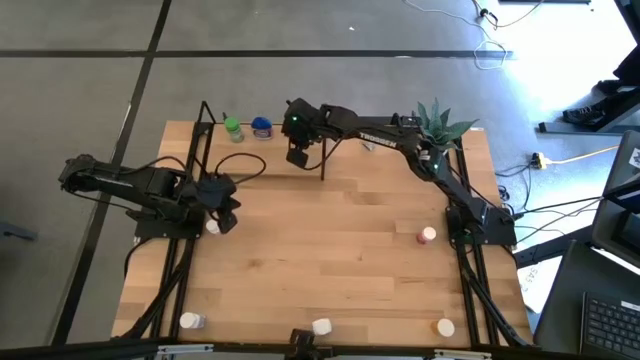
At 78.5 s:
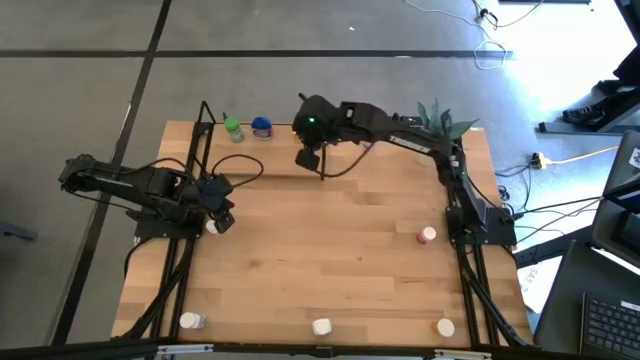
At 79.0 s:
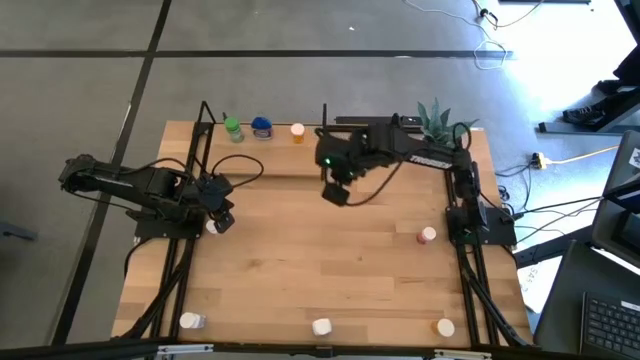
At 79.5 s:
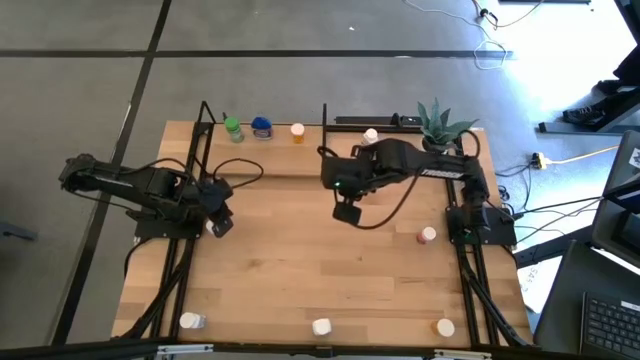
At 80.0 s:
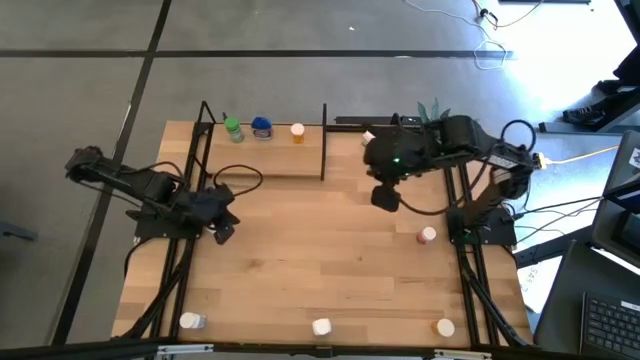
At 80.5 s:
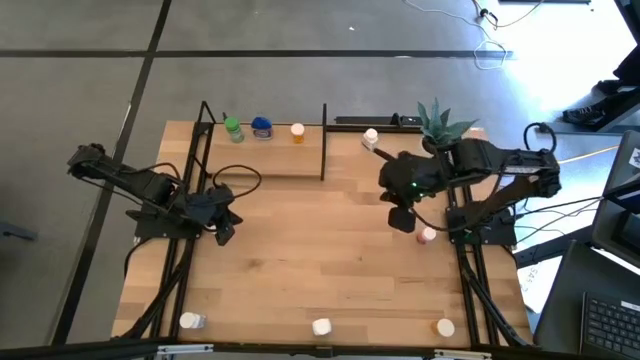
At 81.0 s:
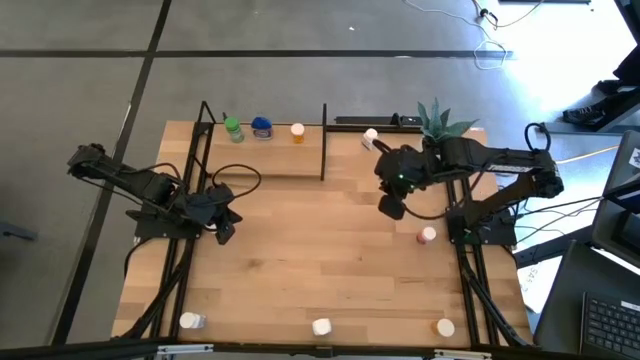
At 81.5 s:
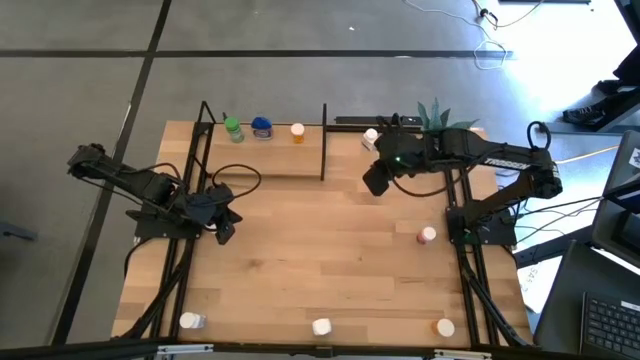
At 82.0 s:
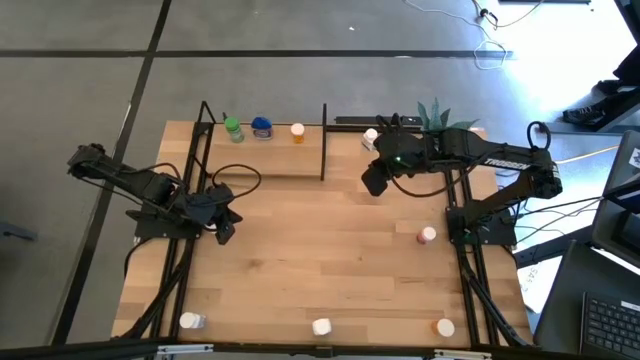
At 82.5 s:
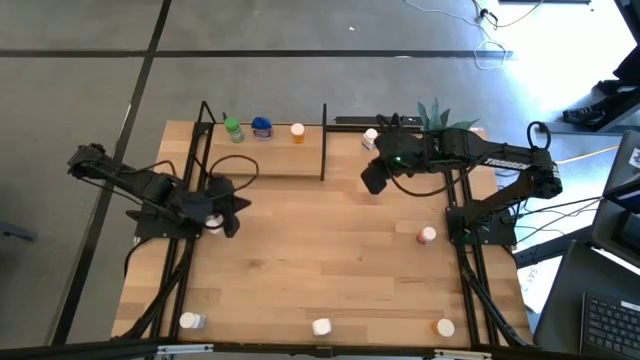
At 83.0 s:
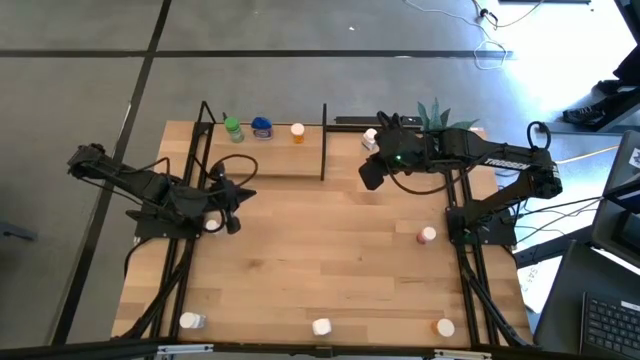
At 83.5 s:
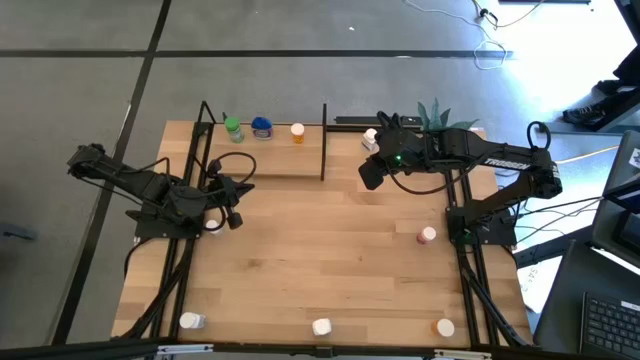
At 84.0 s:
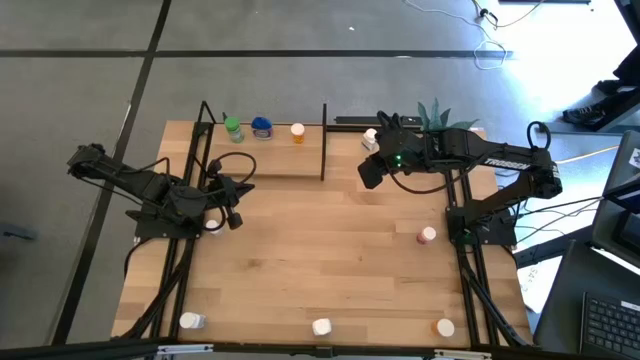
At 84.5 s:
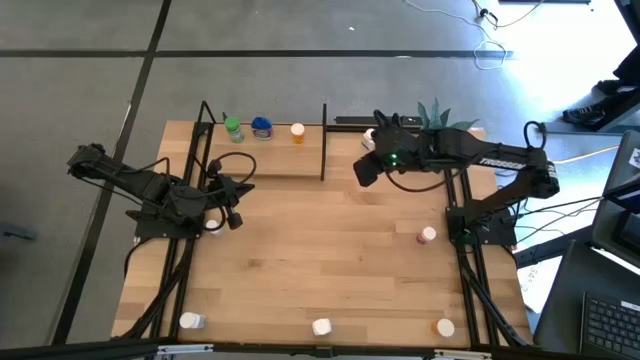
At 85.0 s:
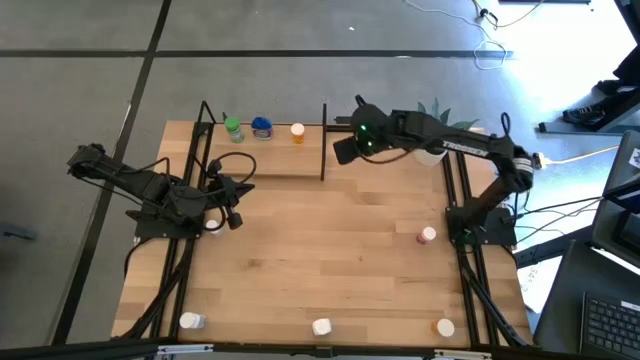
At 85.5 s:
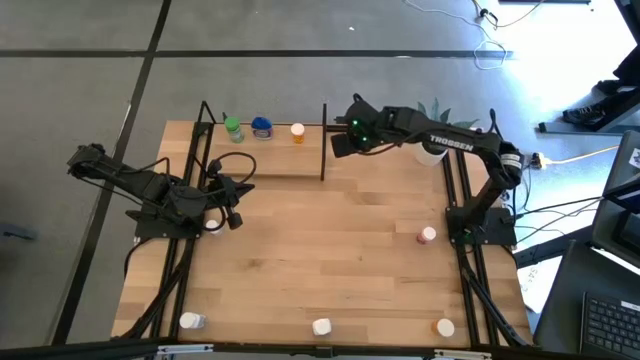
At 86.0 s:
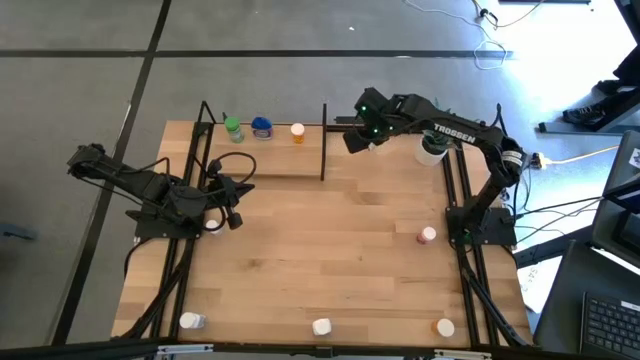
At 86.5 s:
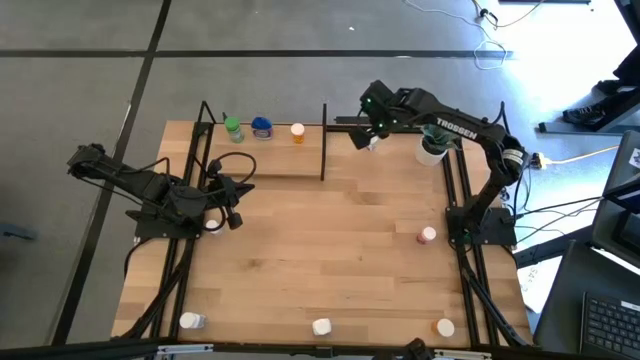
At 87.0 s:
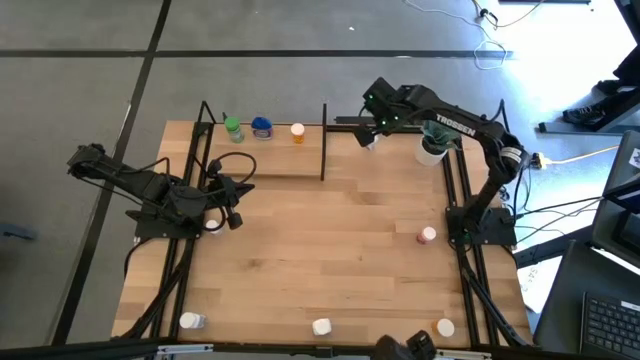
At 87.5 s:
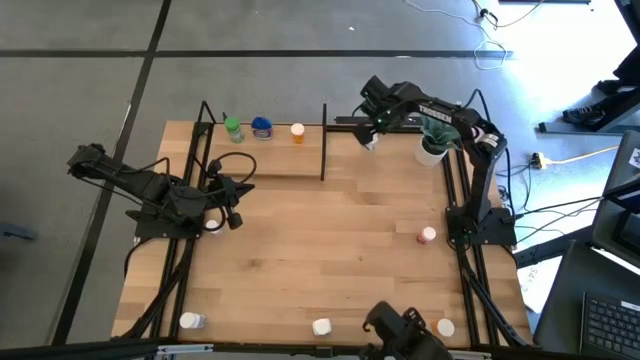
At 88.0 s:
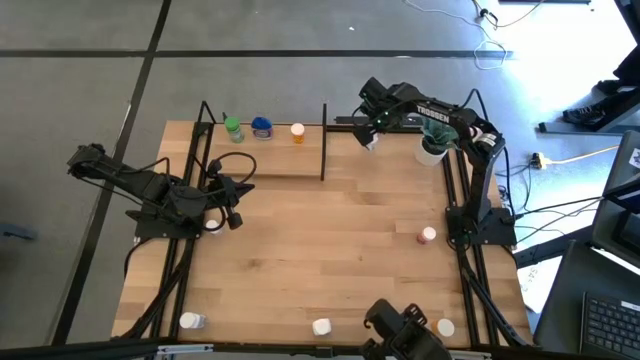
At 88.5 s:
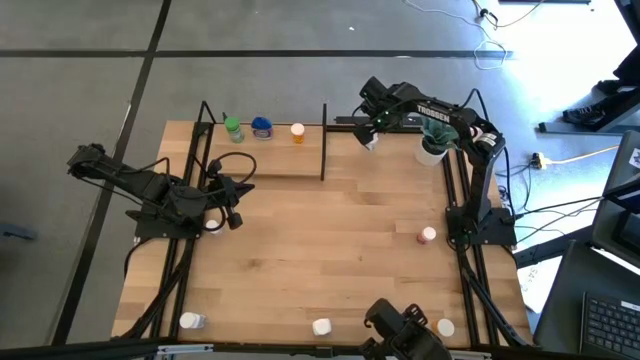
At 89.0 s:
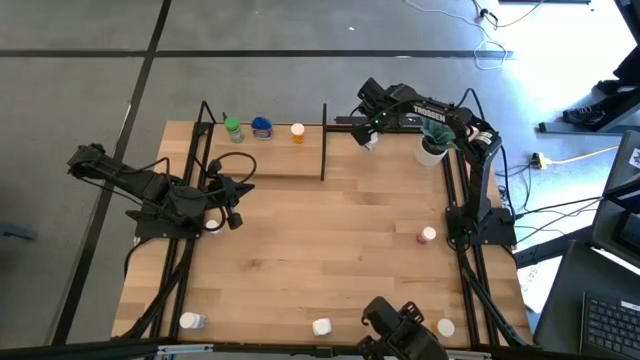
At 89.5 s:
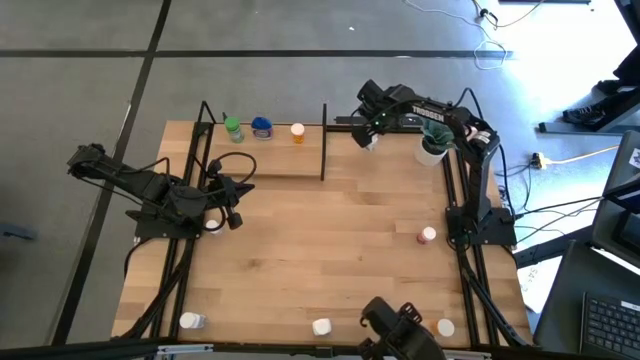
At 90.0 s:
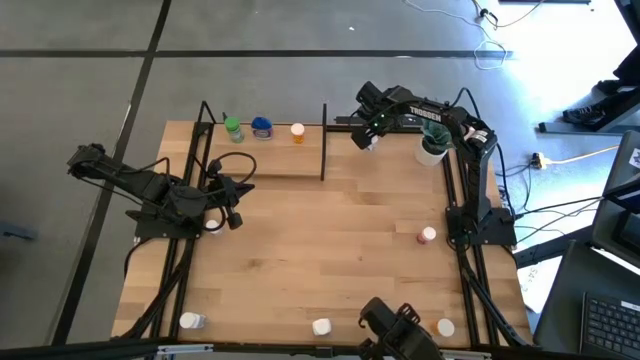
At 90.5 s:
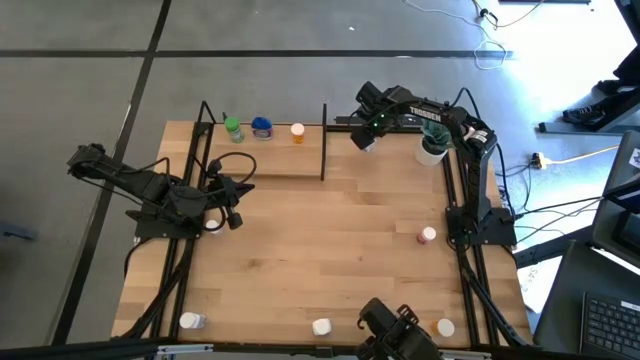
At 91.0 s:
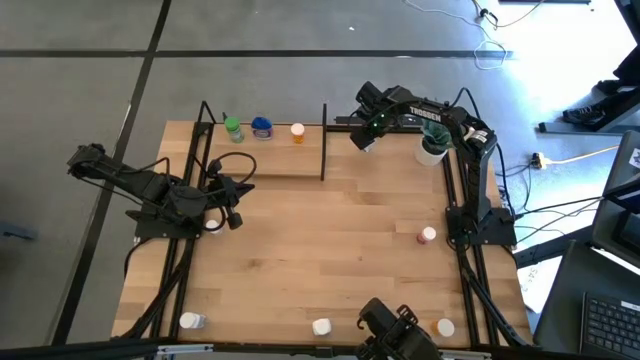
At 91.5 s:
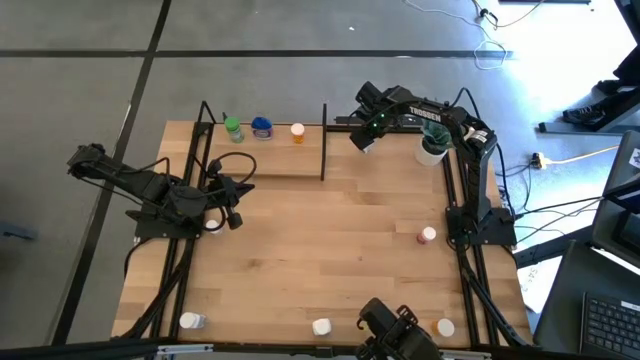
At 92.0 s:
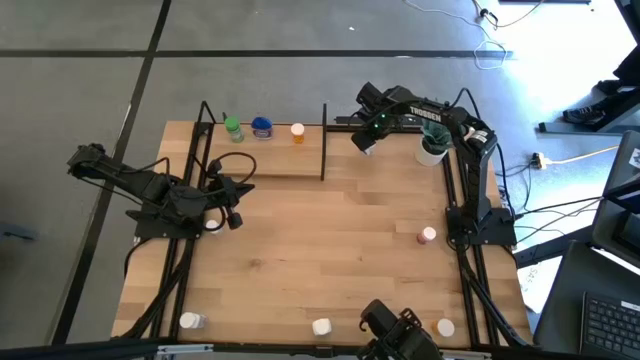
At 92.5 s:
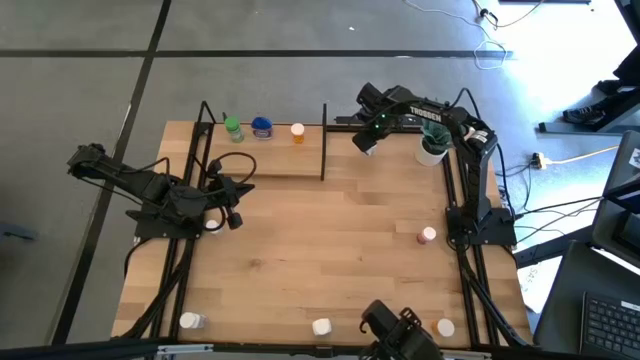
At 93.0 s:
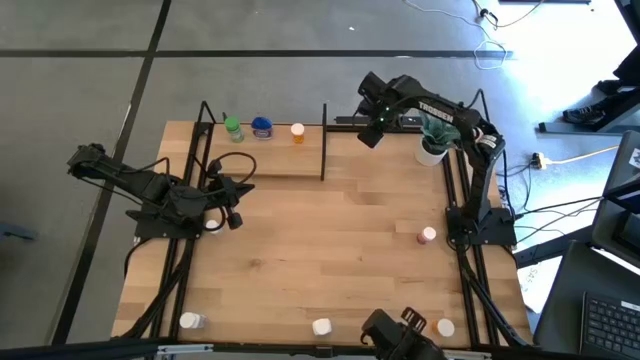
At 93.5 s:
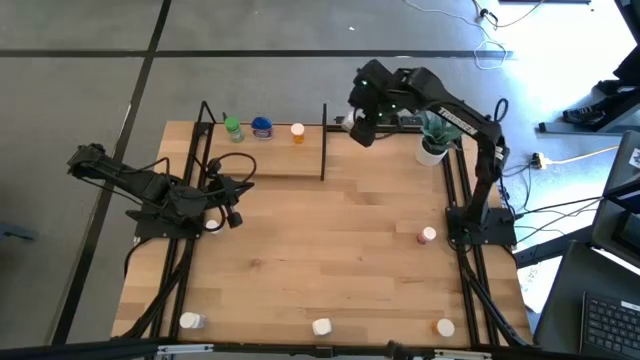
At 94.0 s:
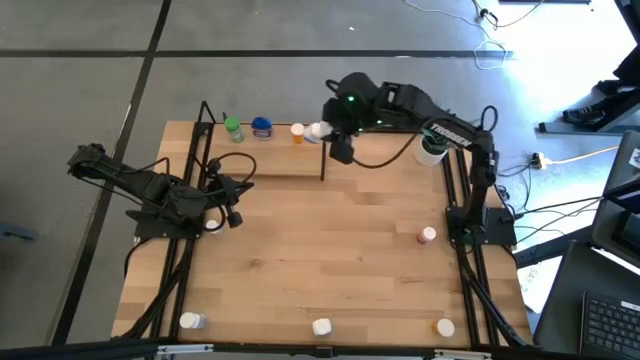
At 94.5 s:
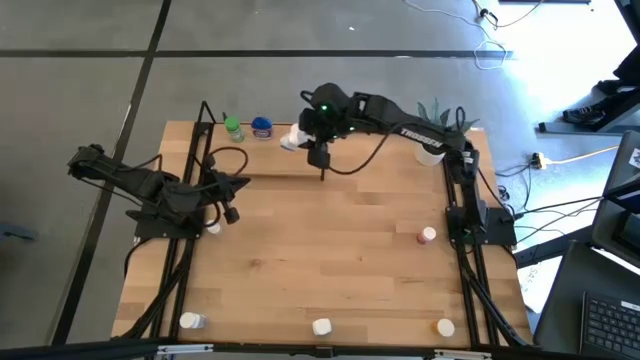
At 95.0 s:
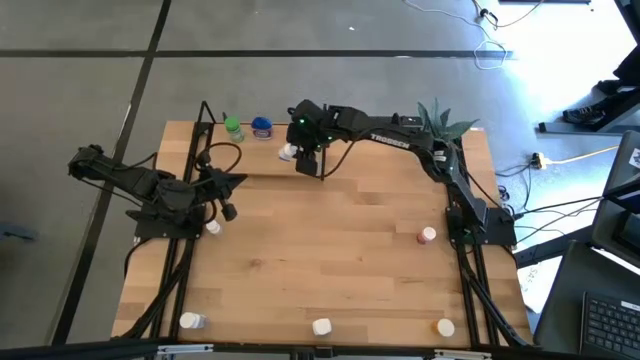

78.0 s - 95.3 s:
Task: Pick and place medicine bottles onto shelf by color
Put the white pill bottle on the shelf
